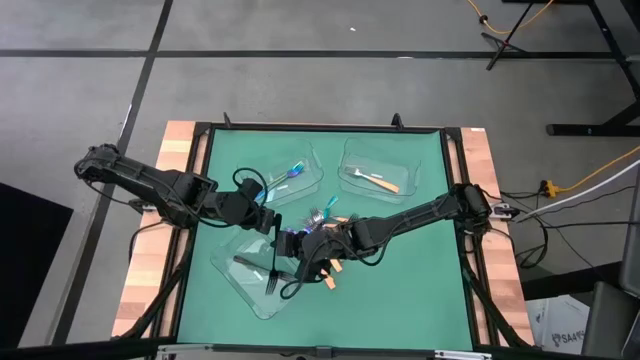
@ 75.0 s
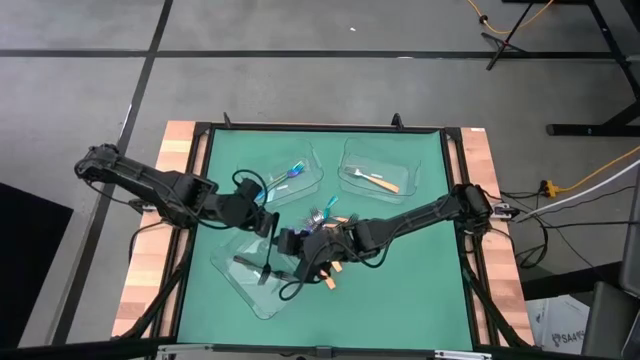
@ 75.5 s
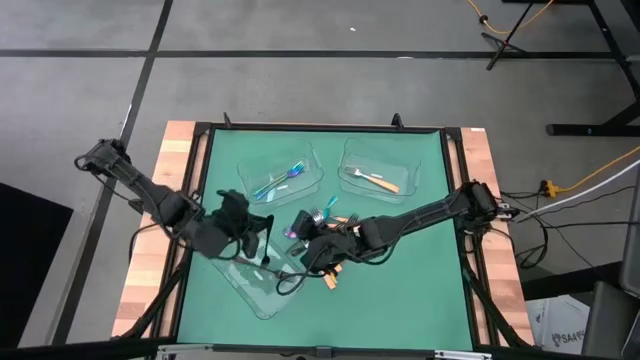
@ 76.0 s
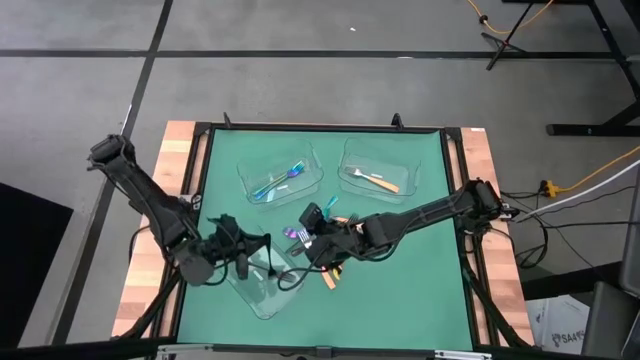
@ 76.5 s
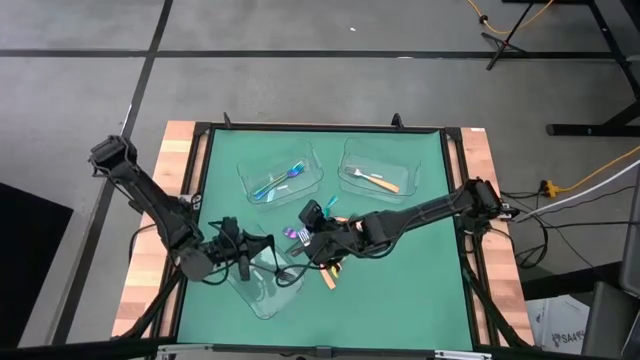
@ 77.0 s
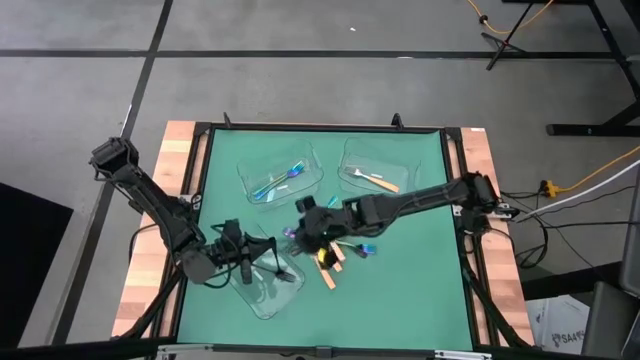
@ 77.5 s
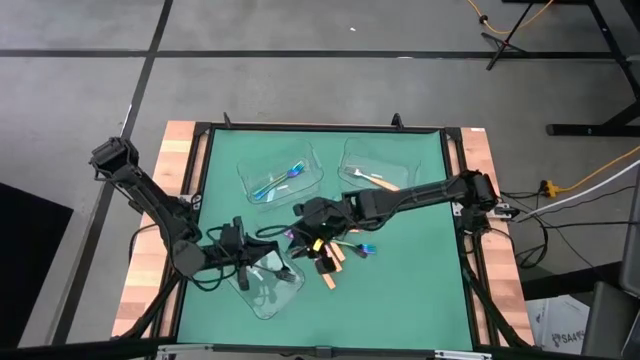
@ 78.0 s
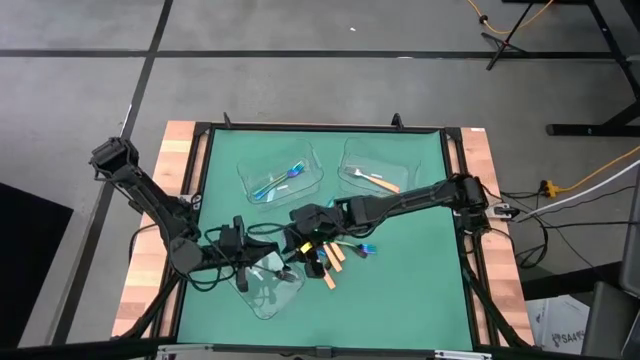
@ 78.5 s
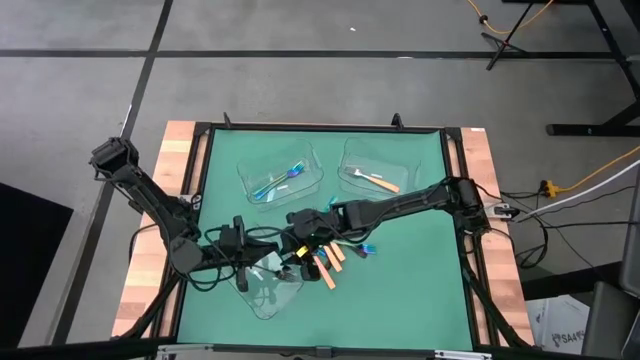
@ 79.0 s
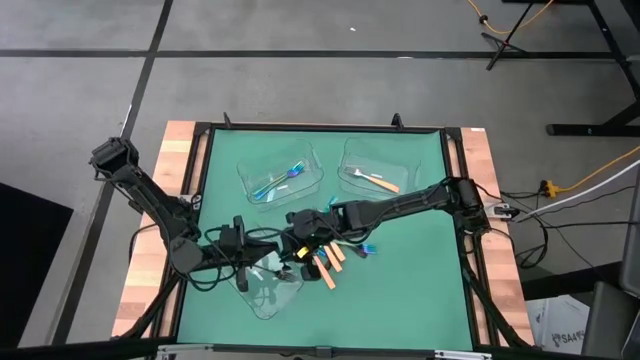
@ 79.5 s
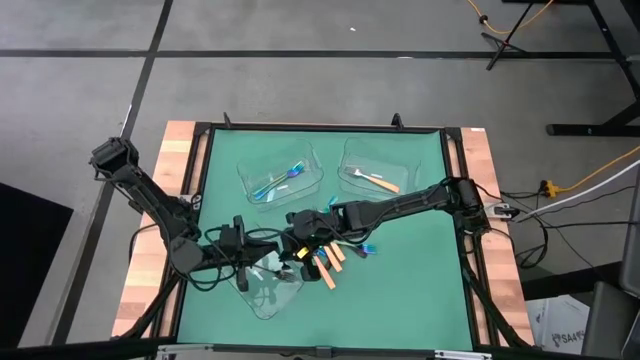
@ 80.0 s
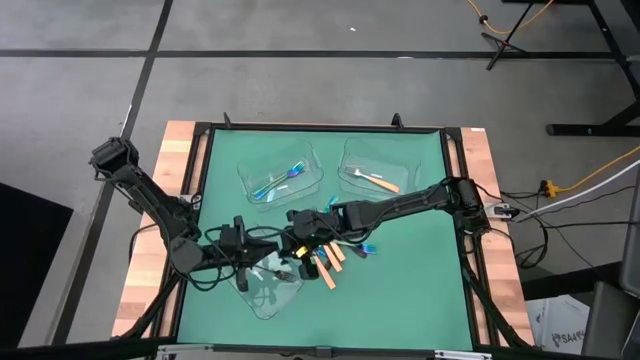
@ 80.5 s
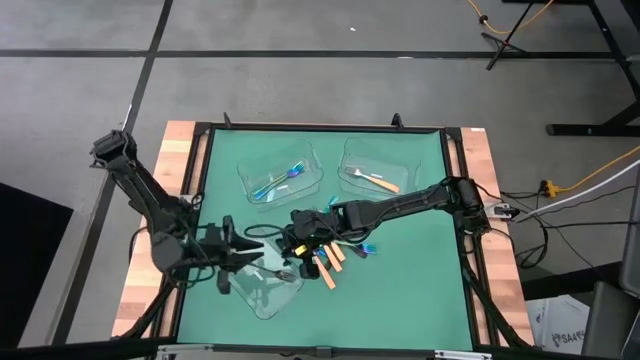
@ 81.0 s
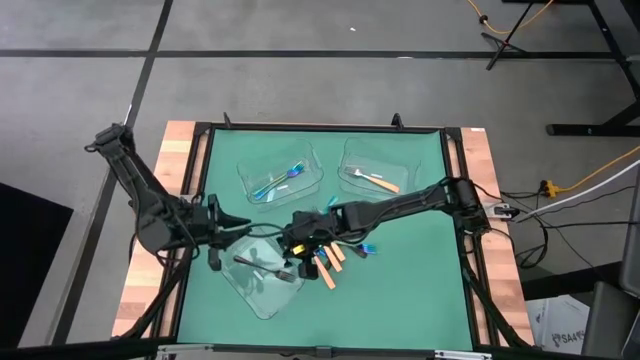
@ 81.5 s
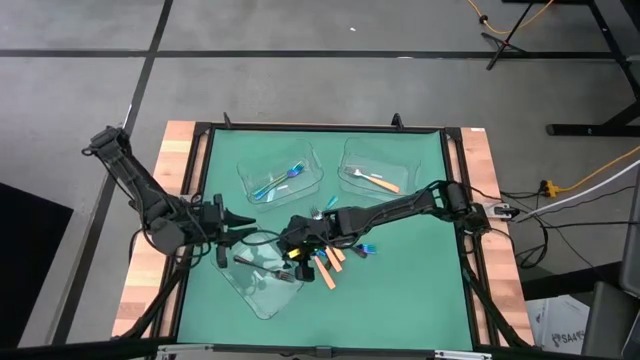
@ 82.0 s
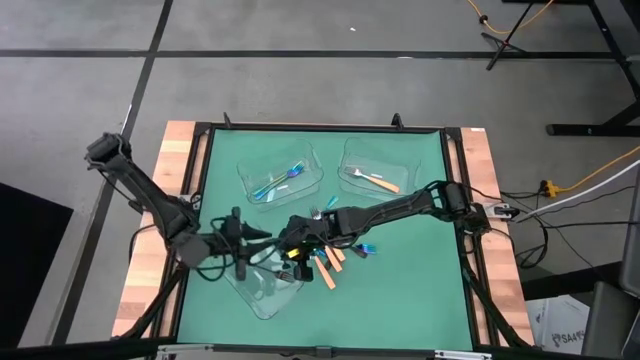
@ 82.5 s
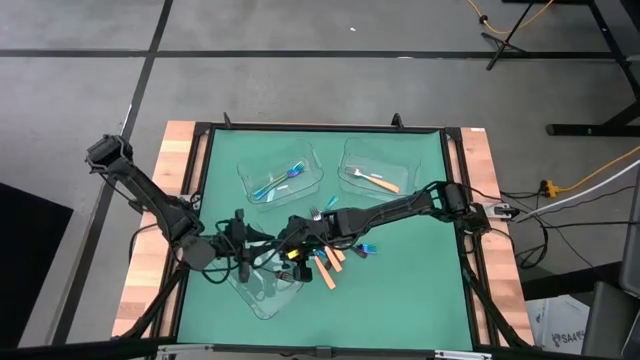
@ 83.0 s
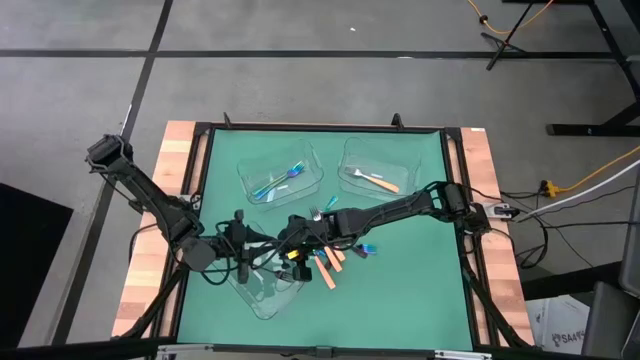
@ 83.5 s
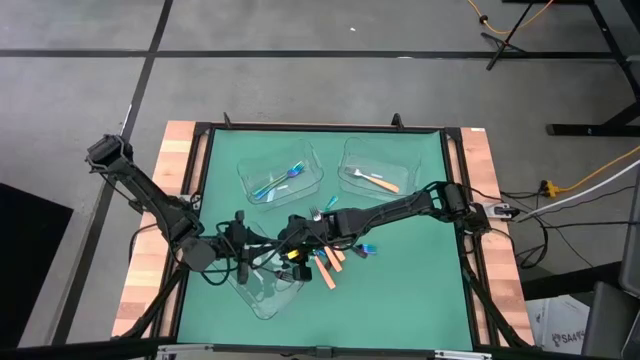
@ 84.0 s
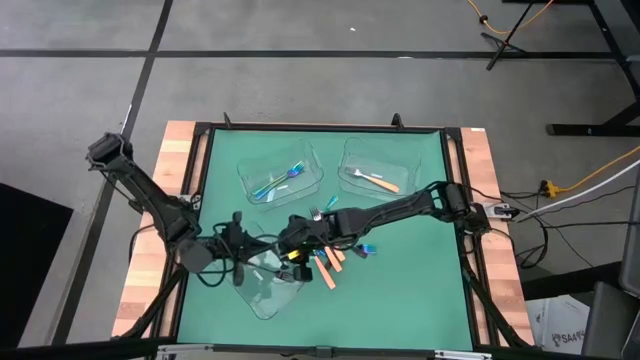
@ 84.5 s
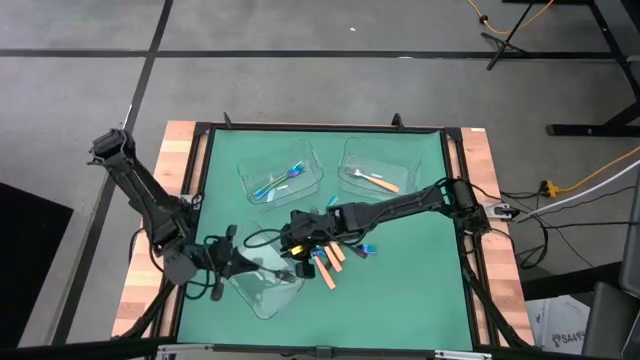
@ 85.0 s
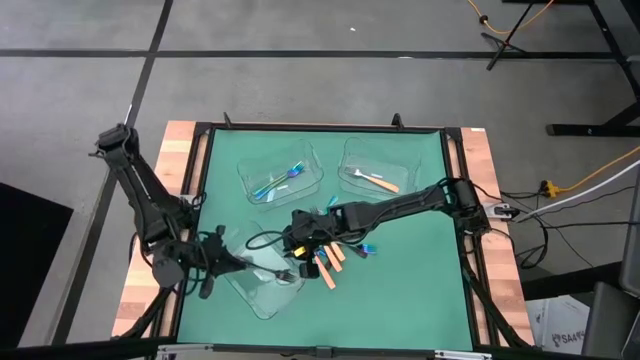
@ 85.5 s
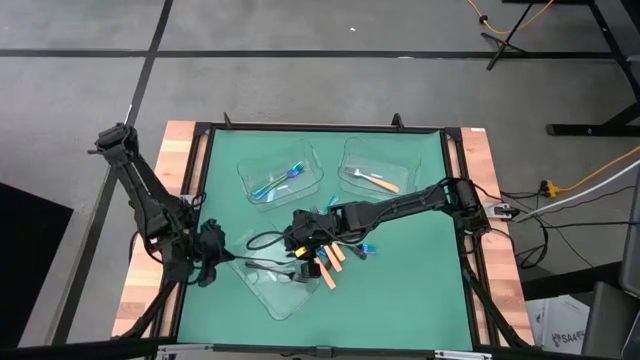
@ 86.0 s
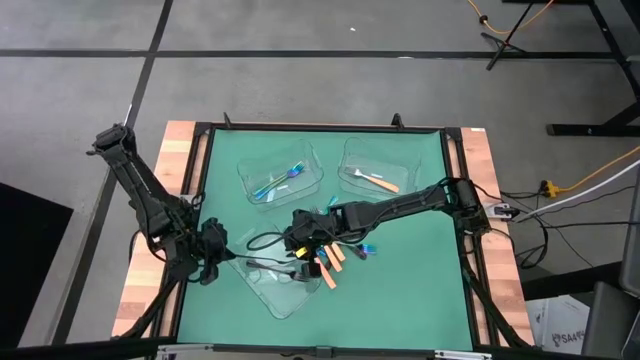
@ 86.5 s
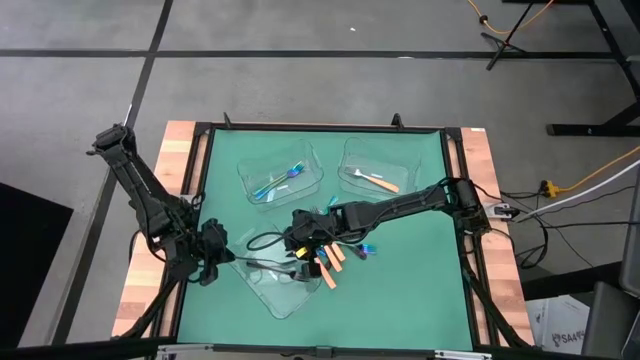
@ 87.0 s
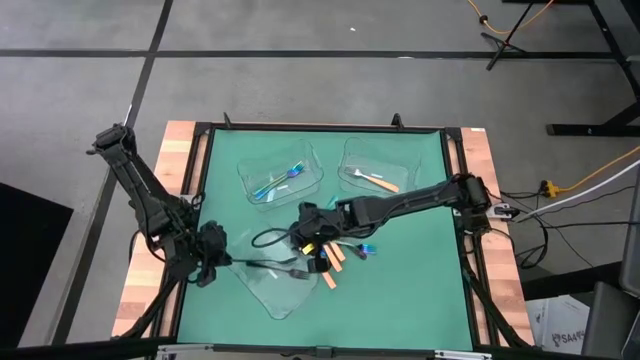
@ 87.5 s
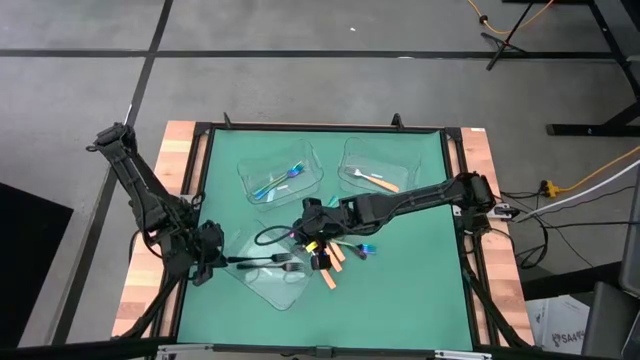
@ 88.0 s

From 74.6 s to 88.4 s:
Task: Sort silverware by color (type)
Put the black fork into the bottom transparent bin
